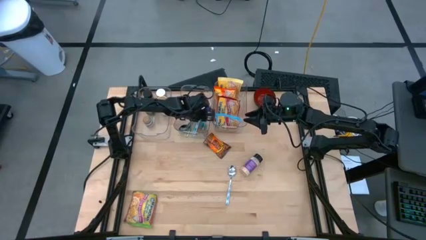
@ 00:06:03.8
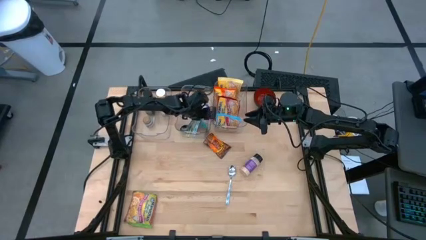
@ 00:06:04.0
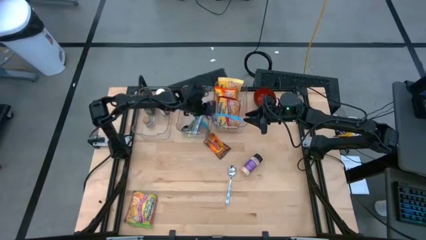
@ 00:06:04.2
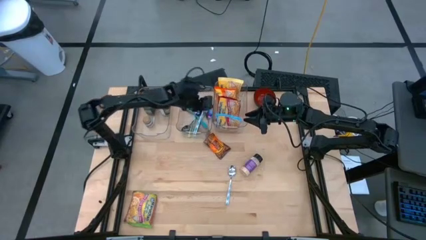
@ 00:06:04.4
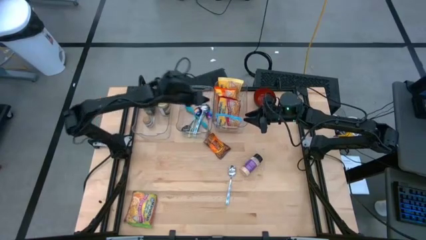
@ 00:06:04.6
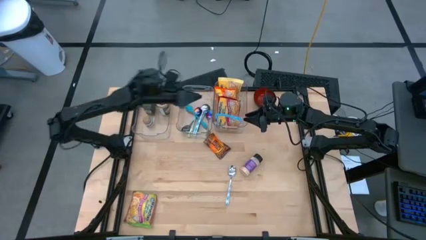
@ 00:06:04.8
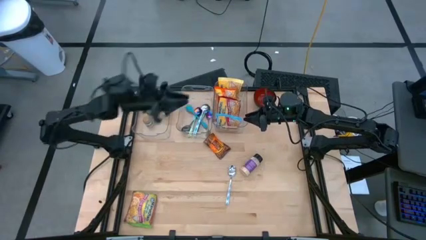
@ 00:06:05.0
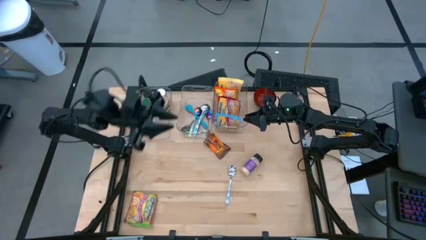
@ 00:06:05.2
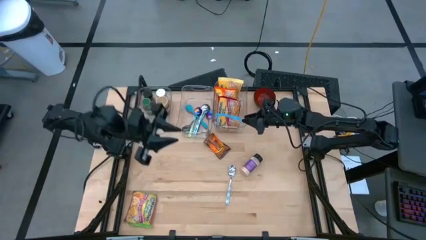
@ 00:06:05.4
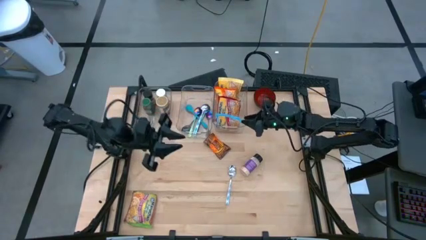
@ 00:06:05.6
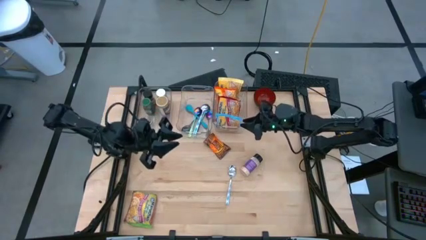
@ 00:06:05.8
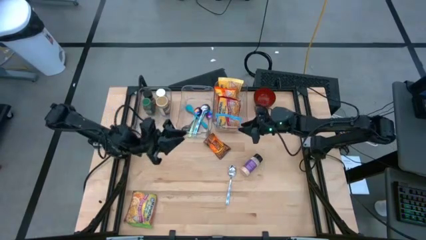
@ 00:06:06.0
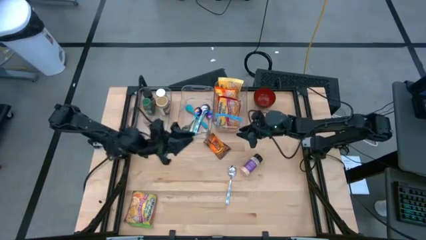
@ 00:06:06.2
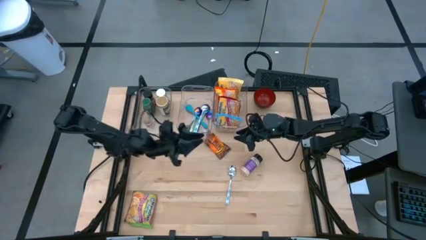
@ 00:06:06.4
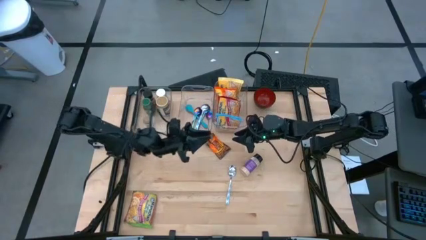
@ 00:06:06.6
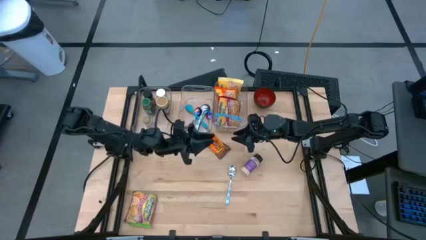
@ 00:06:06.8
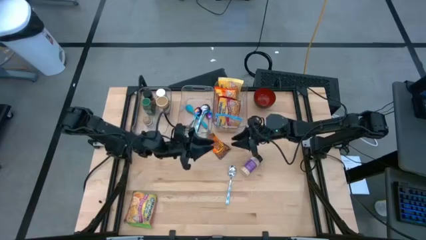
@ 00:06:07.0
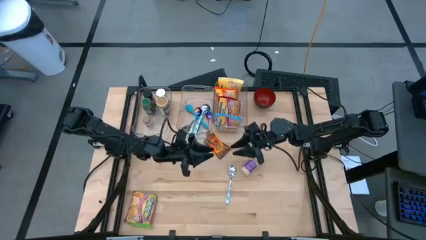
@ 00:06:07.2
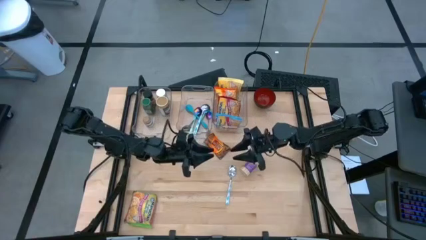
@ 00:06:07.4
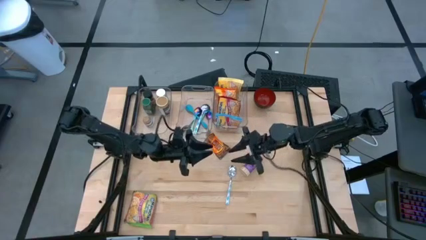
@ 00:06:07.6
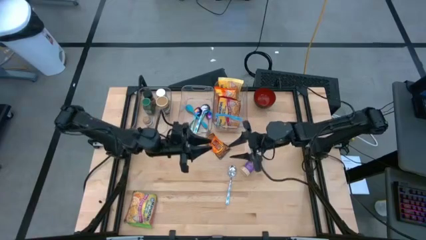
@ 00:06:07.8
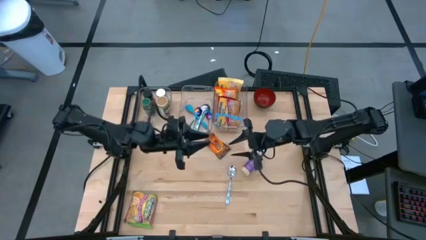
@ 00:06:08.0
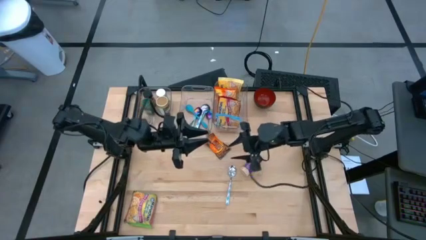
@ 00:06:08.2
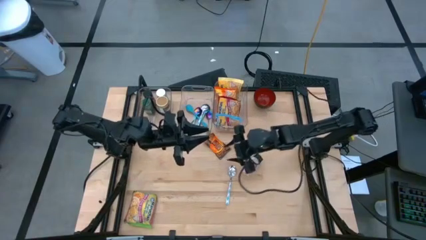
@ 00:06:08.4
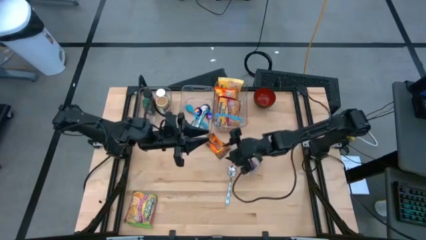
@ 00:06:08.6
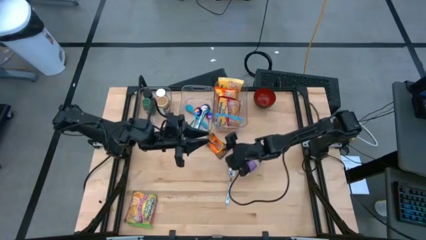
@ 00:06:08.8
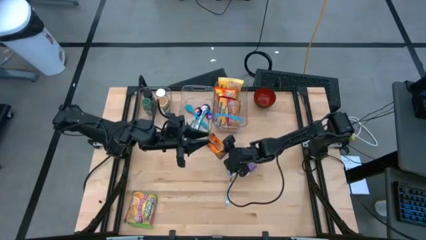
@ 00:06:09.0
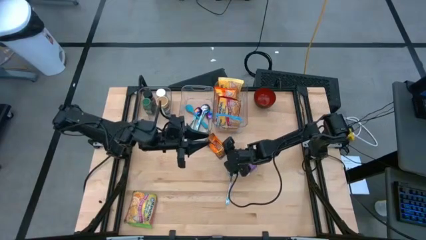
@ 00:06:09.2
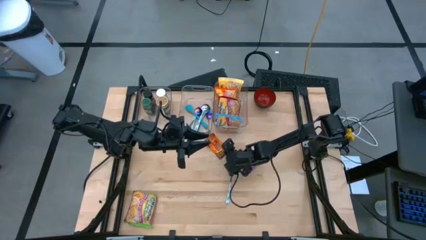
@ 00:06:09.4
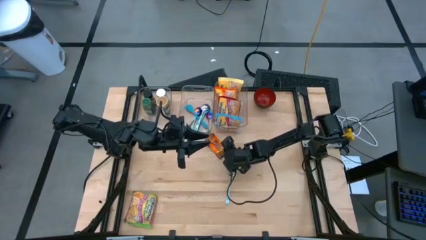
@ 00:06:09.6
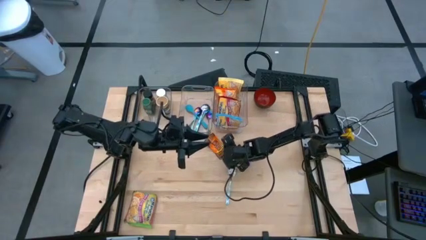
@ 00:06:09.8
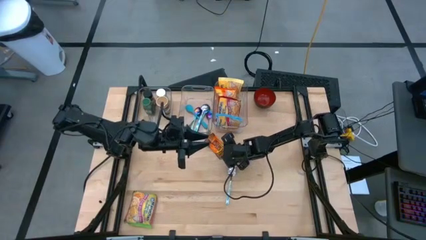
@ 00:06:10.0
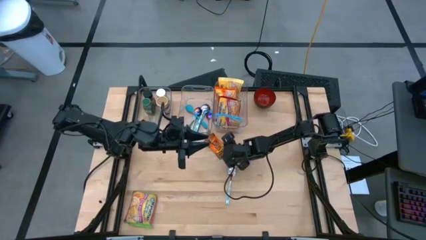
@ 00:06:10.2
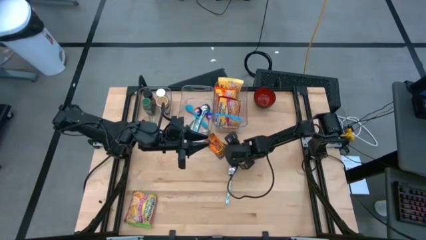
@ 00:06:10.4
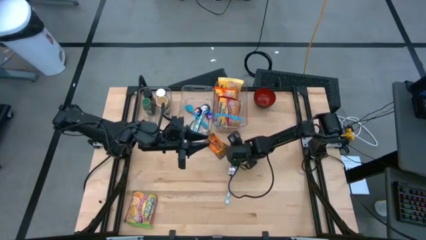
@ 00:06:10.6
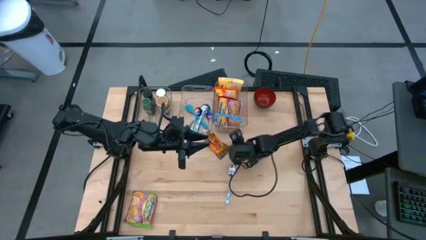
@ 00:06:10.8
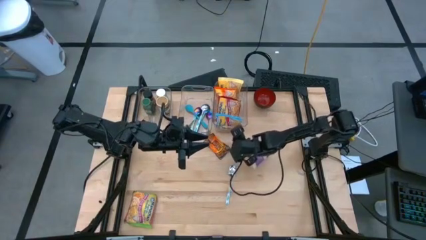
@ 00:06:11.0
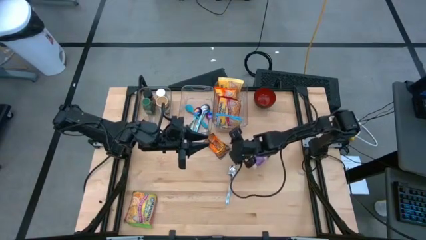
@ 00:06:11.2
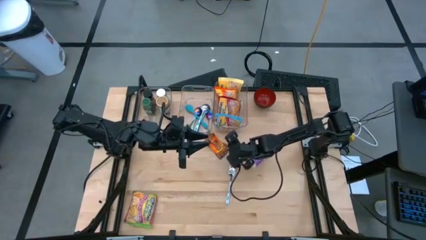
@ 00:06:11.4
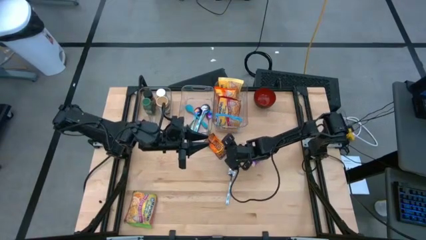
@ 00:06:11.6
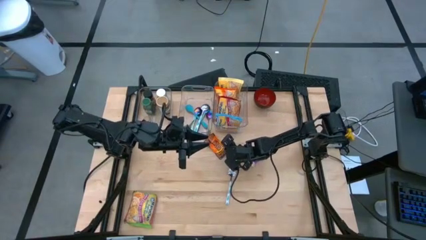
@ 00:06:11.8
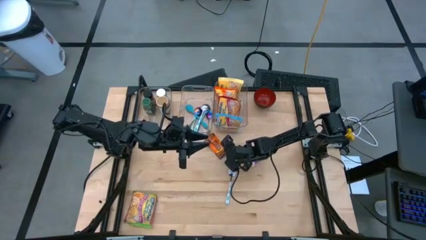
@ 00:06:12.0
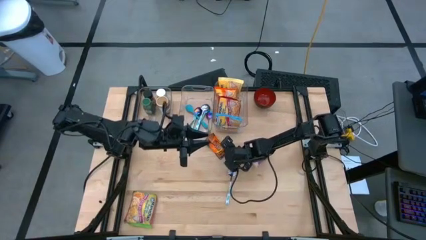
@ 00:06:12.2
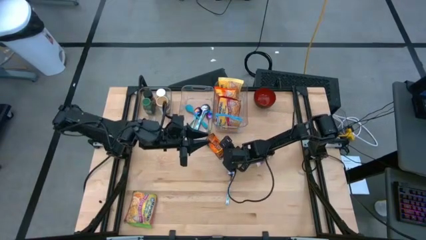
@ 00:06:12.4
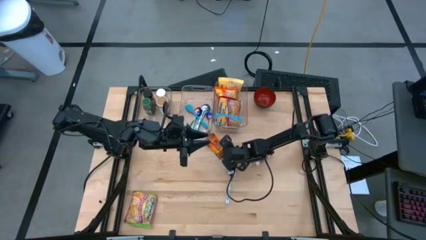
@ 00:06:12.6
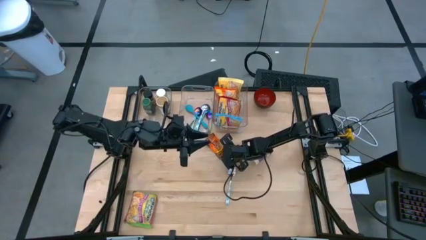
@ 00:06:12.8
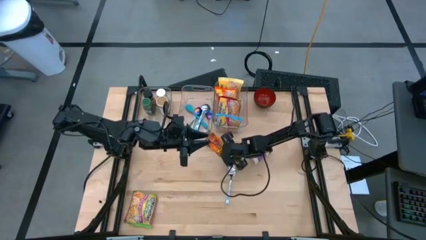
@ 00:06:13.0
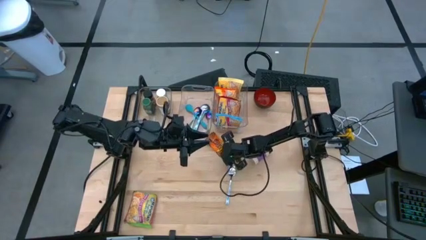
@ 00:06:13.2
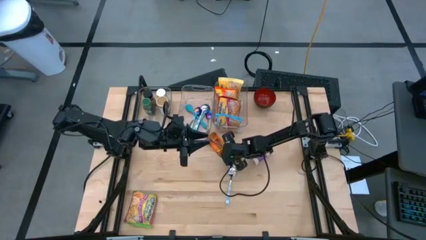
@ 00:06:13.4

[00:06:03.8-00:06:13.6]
Task: Pick & Place Food Item
Put the orange spice pack into the left transparent bin
